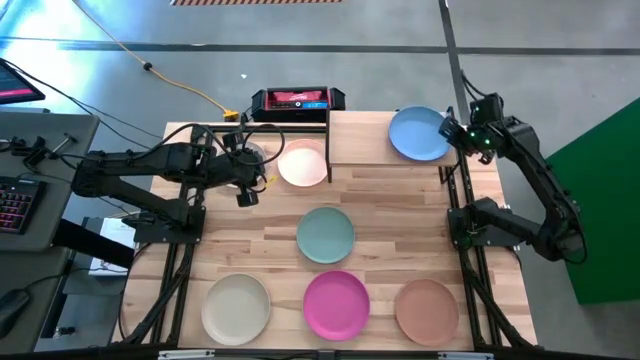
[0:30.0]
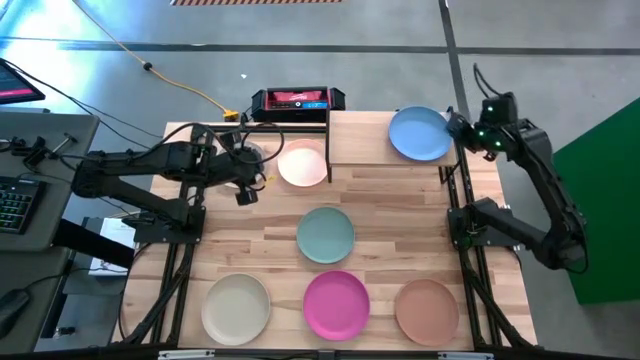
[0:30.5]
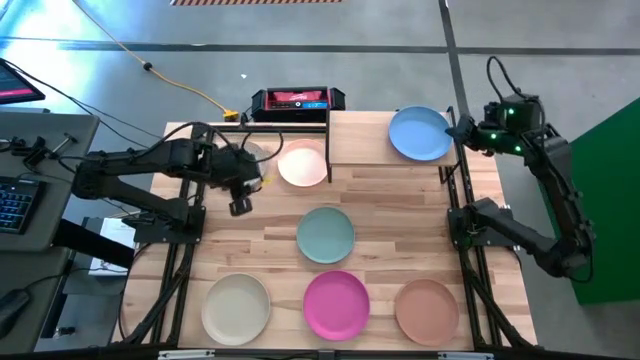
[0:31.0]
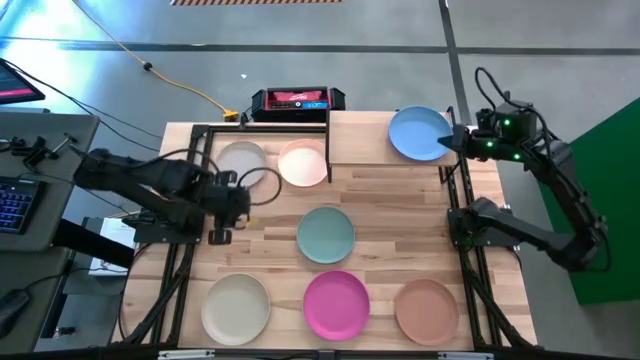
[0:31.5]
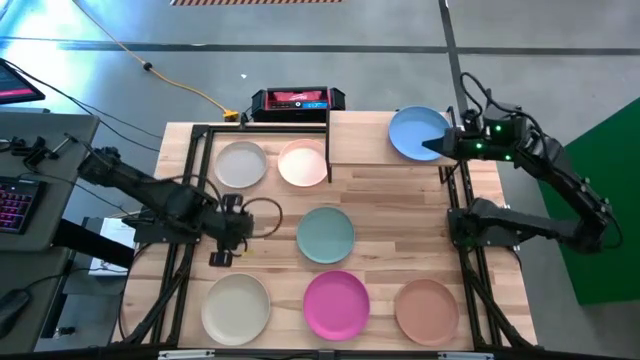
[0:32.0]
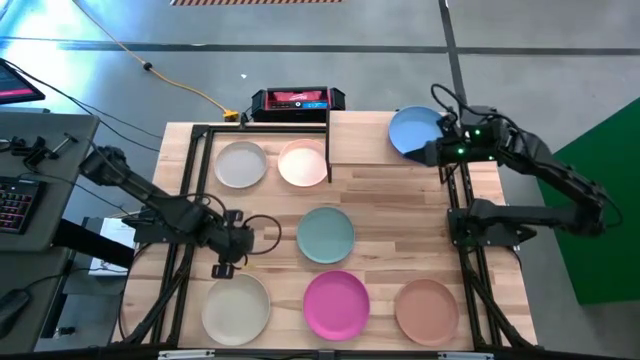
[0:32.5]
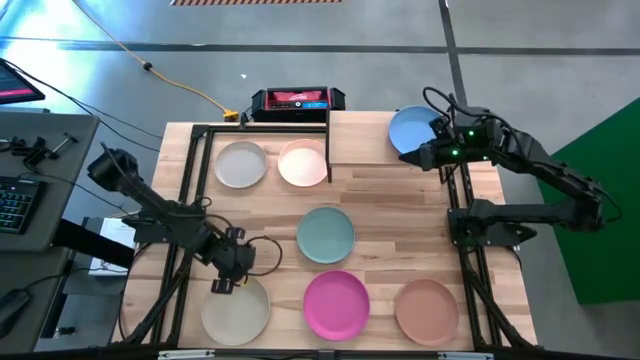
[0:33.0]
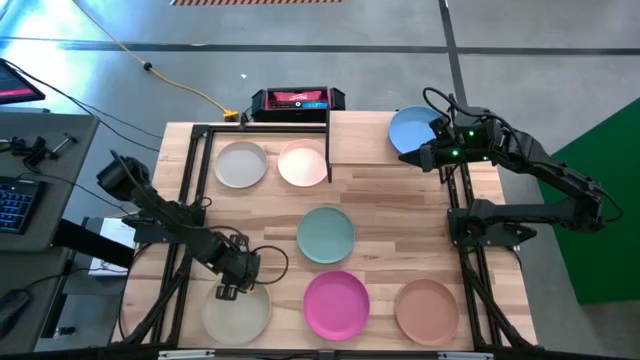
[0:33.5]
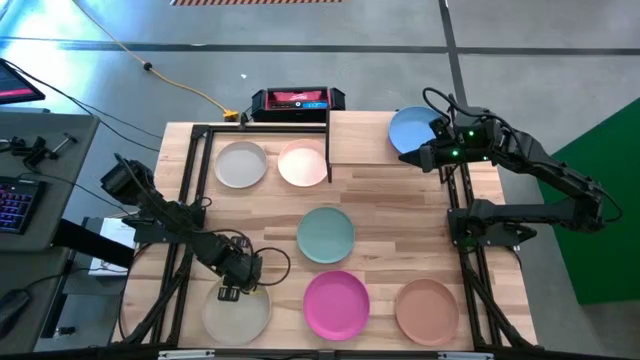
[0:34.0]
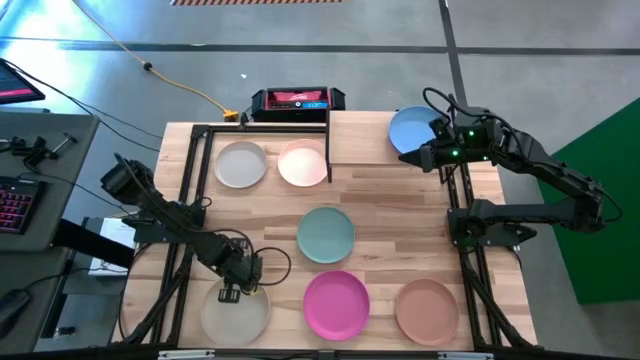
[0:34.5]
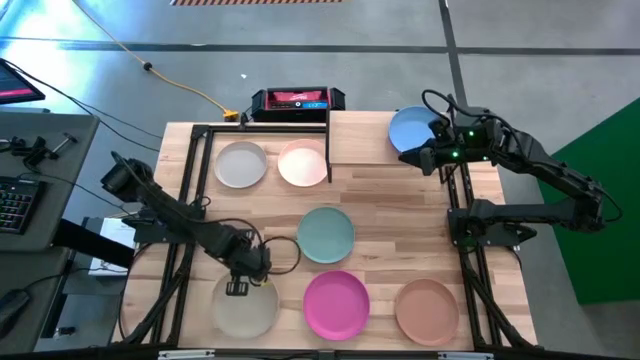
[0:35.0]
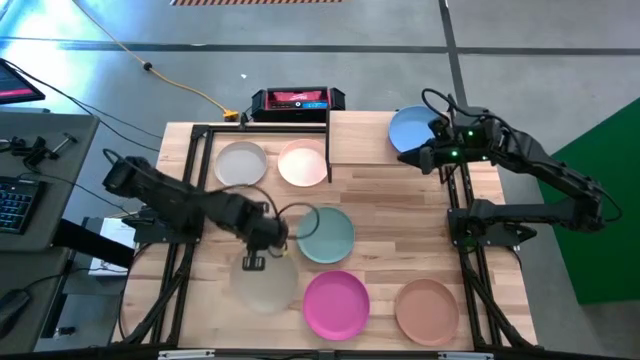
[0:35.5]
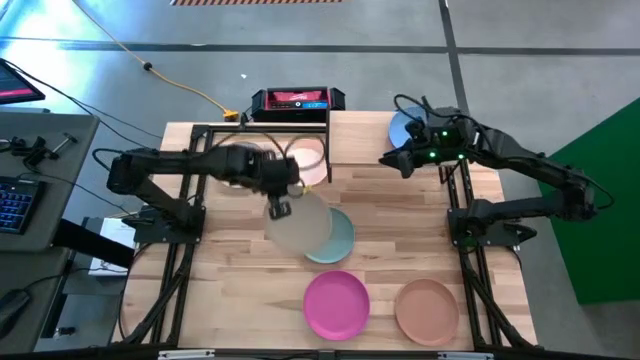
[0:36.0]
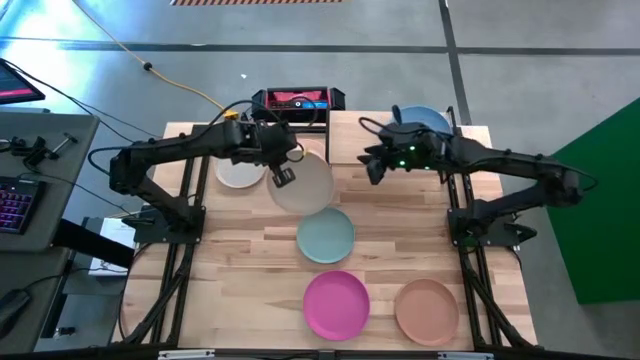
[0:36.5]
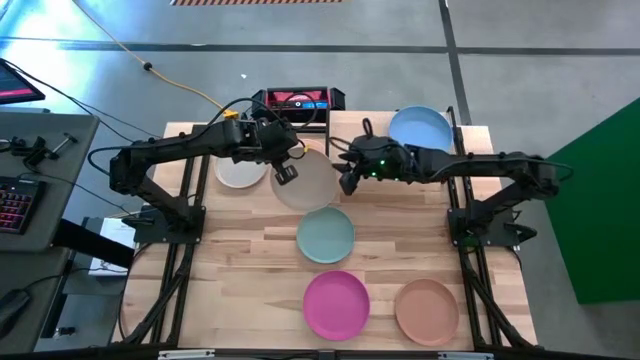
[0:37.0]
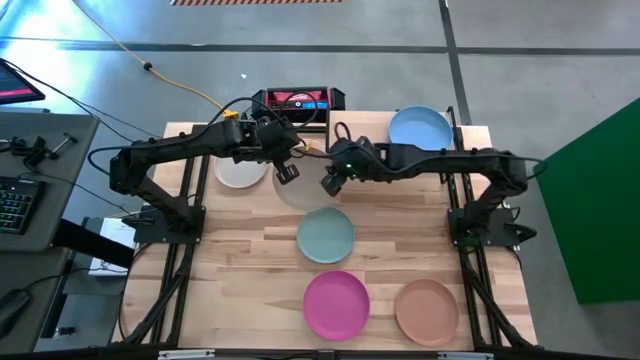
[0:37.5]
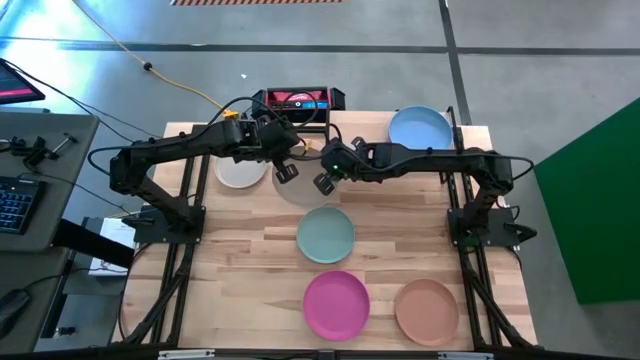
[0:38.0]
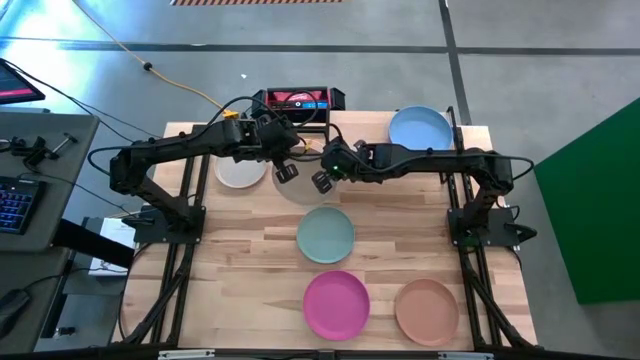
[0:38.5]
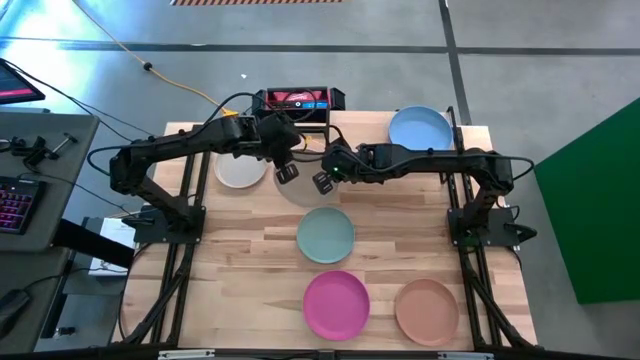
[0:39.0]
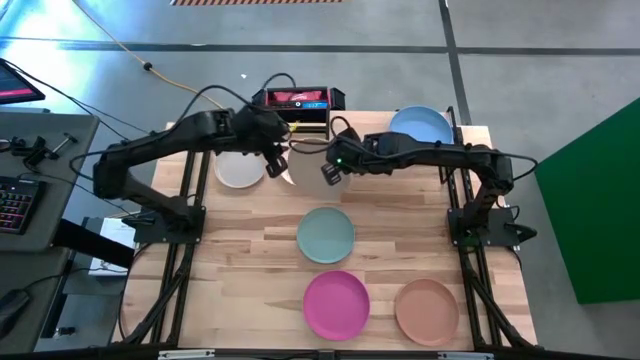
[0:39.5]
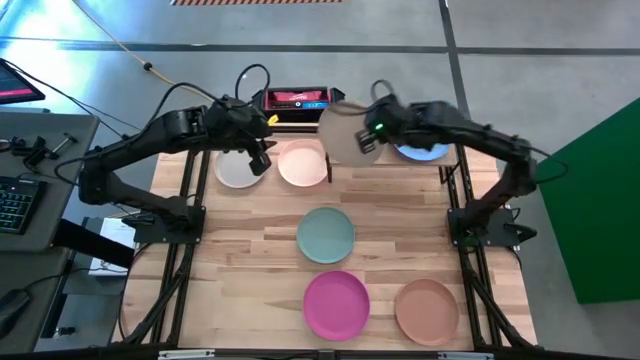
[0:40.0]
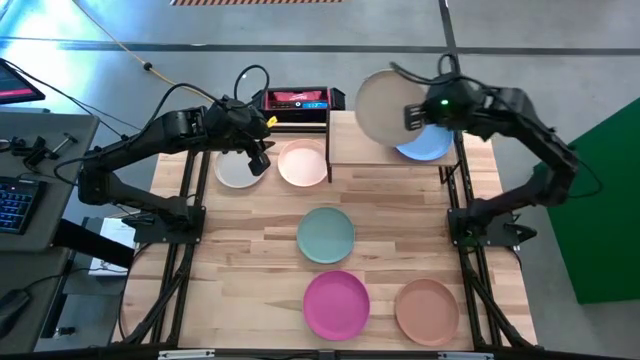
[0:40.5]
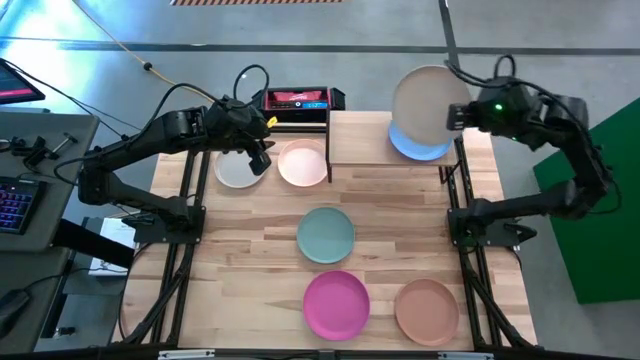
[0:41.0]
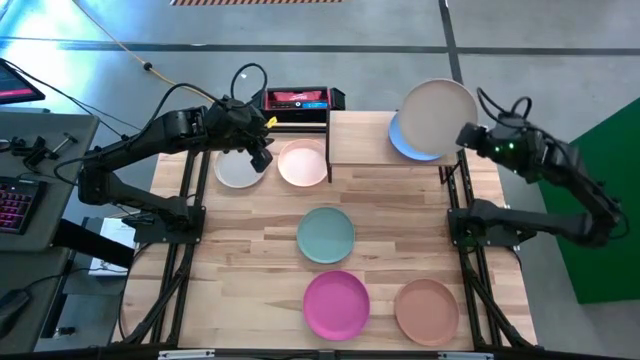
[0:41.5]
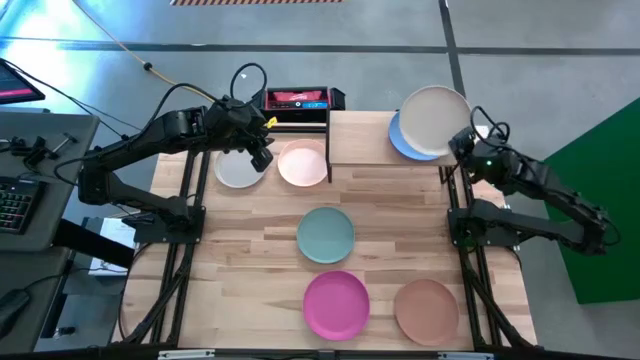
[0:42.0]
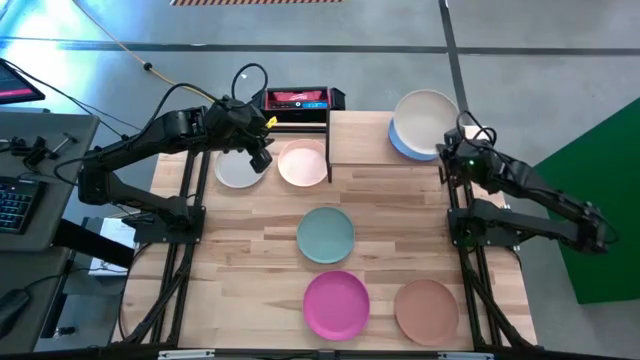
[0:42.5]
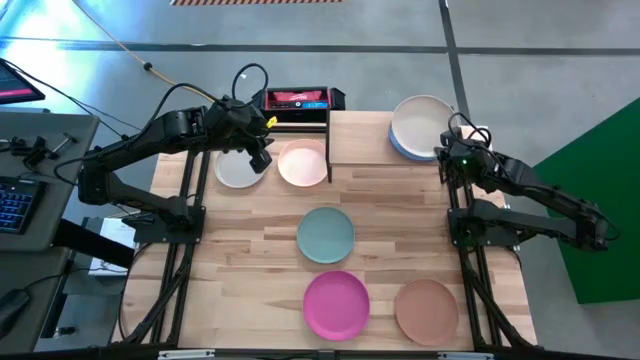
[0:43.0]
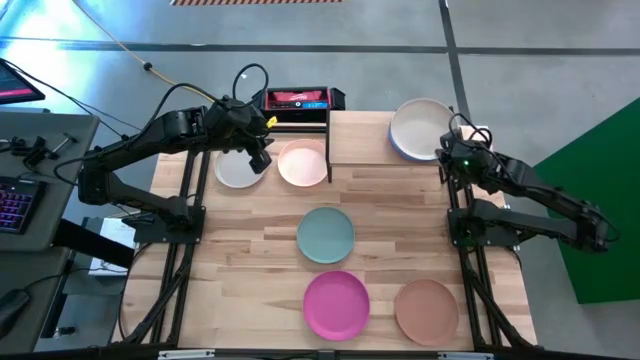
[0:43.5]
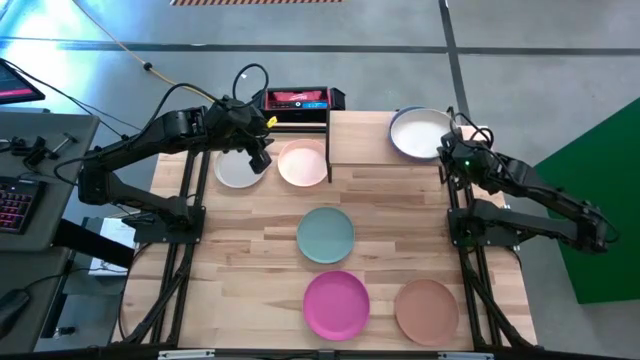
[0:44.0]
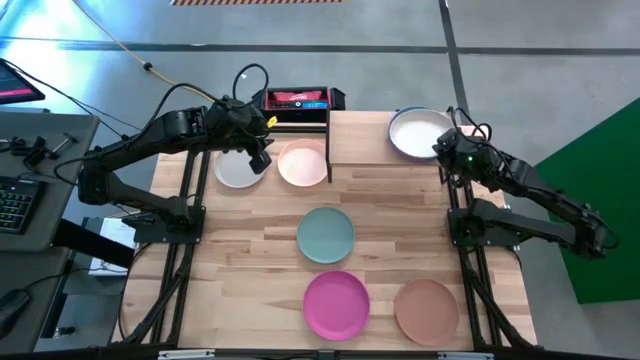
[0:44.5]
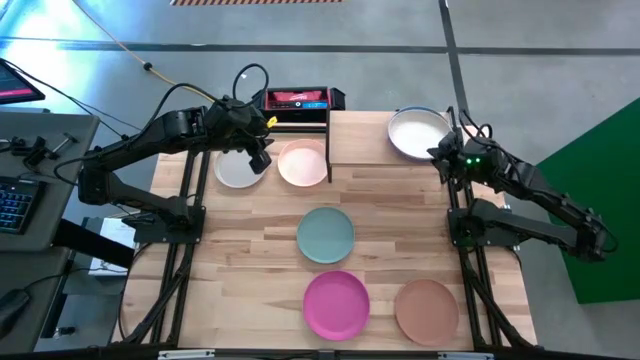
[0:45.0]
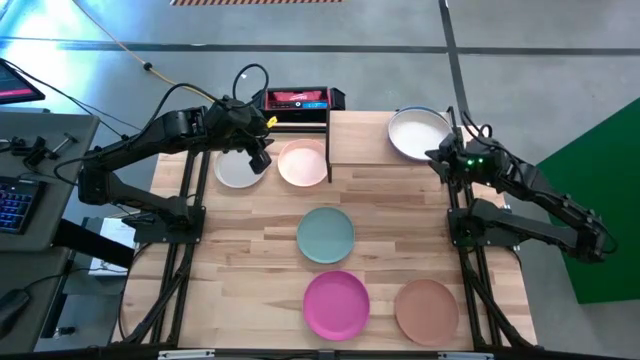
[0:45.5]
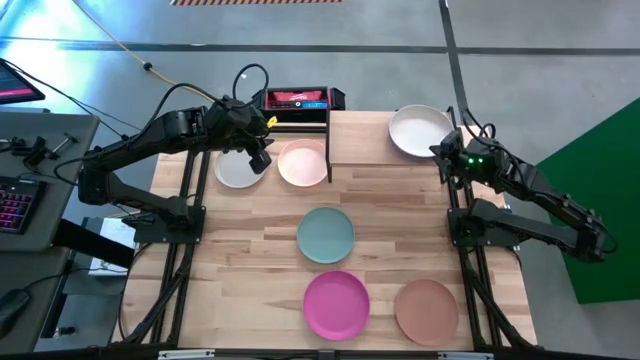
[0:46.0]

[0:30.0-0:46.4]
Task: Place and stack plates onto a shelf
Stack the light gray plate on the blue plate on the shelf

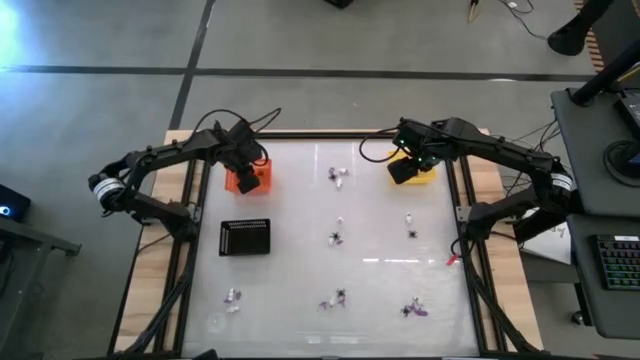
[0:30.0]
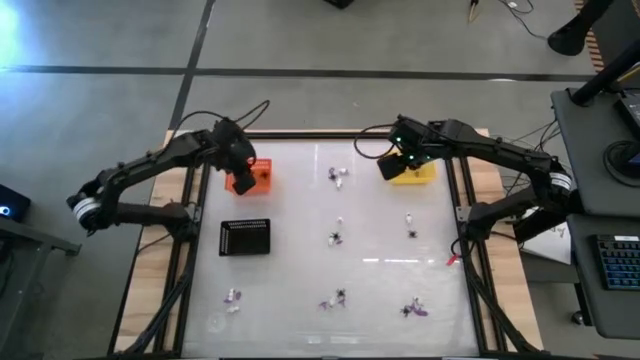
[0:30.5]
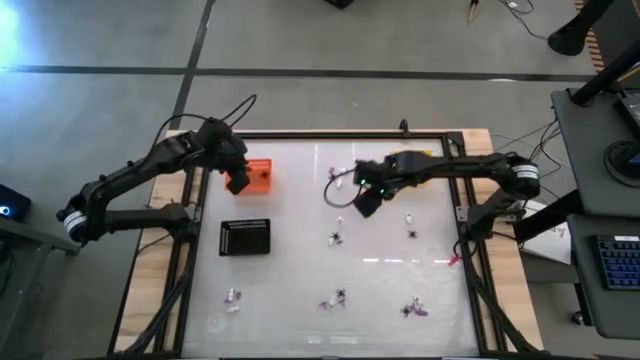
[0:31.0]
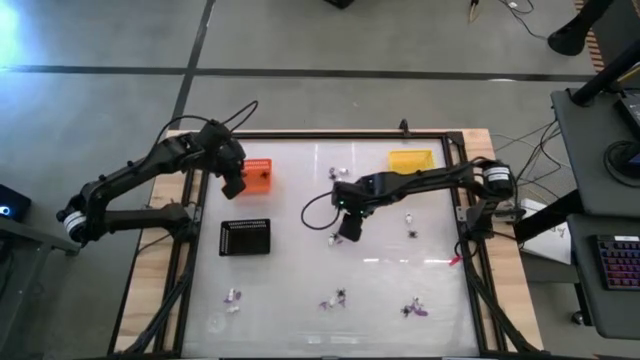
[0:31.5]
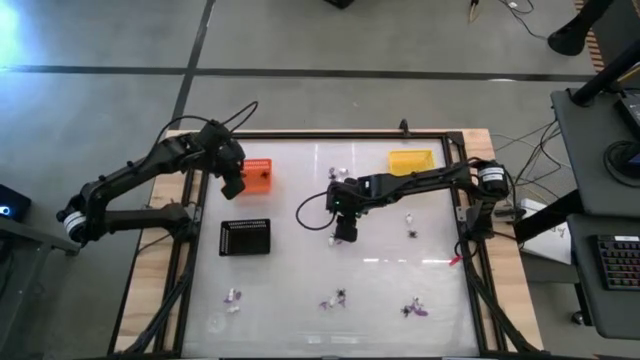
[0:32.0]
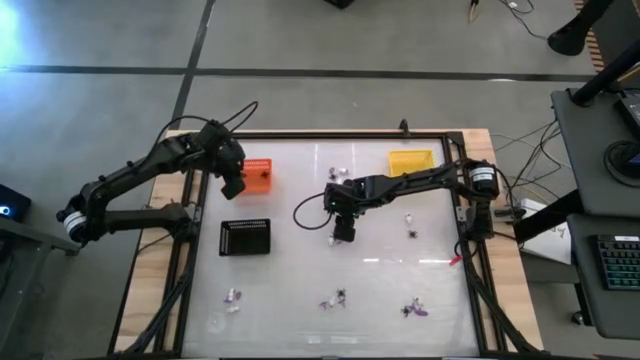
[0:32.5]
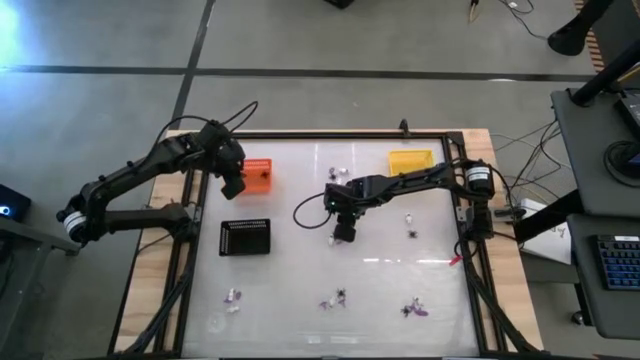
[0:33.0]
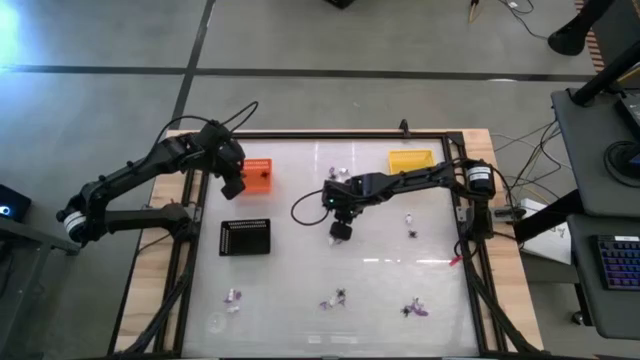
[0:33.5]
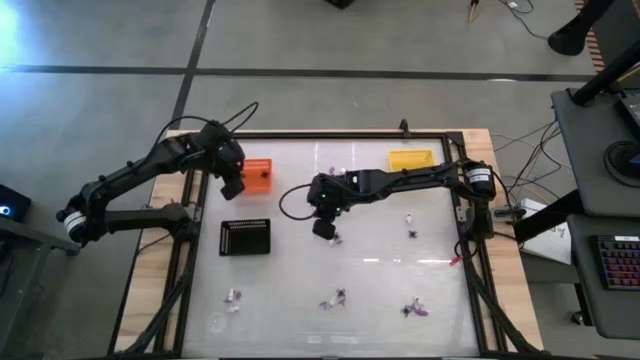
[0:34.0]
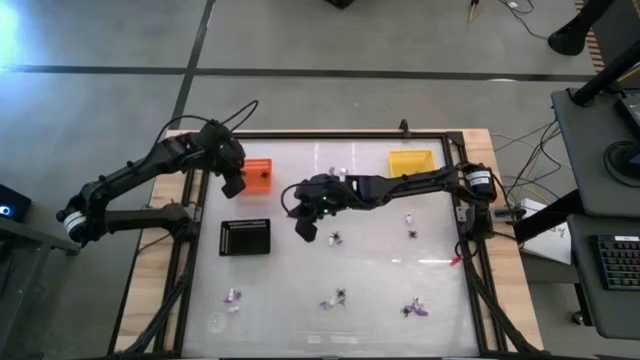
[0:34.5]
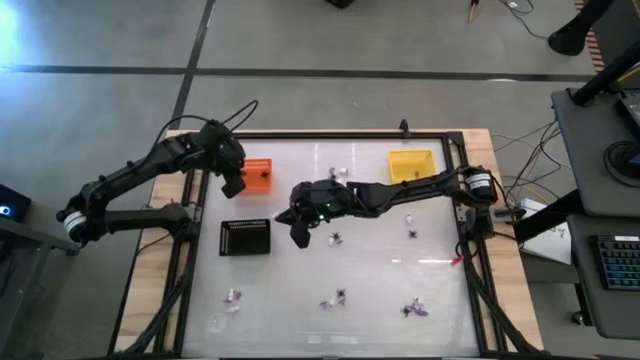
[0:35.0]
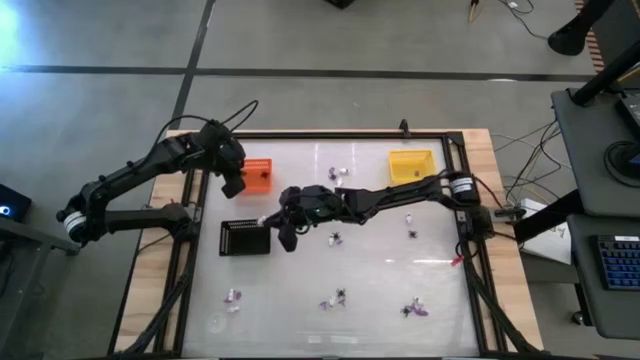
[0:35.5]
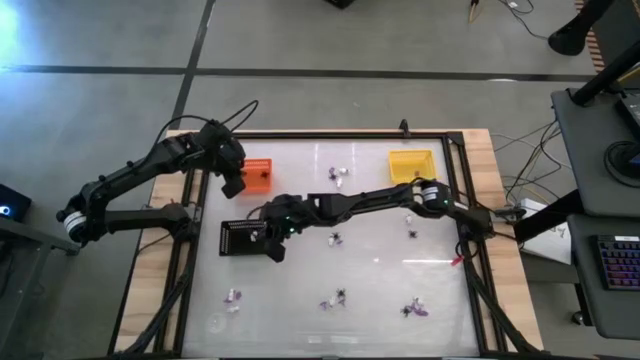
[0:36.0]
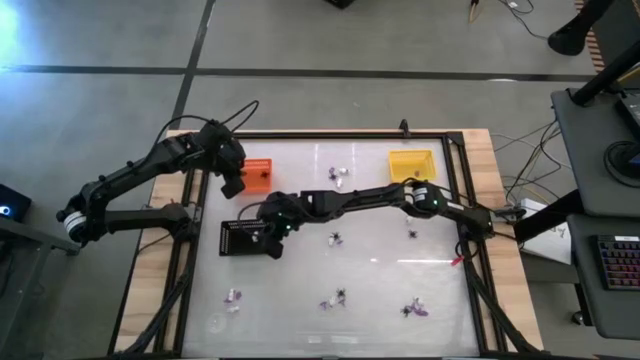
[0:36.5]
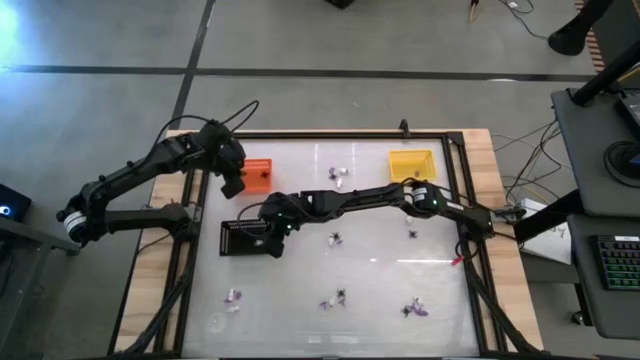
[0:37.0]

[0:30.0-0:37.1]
Task: Sort Halloween decoration
Put the white skeleton toy into the black bin
